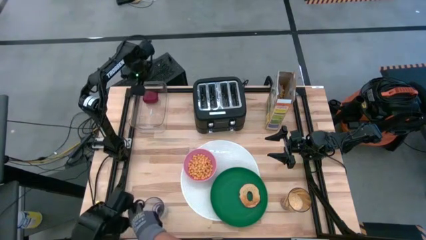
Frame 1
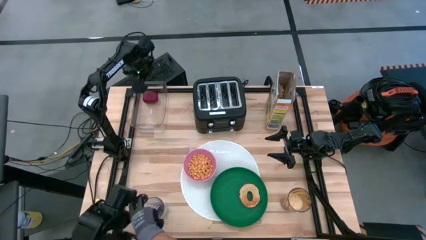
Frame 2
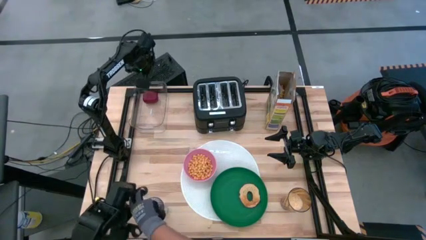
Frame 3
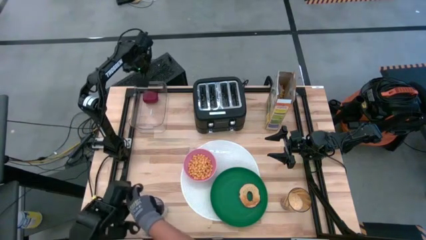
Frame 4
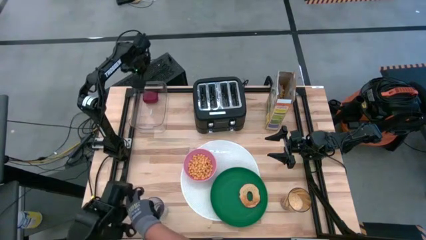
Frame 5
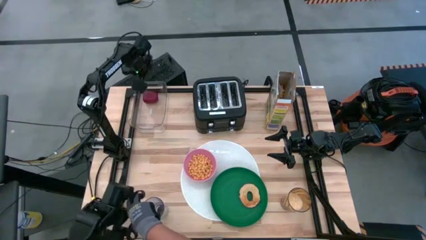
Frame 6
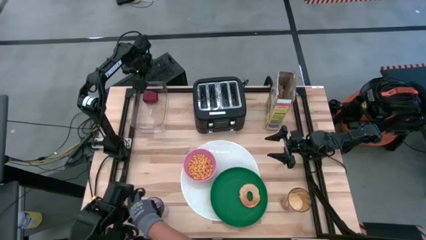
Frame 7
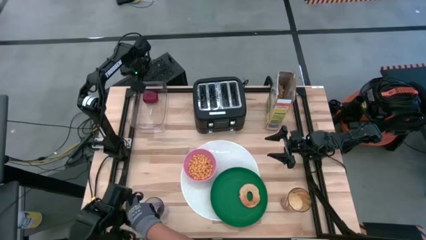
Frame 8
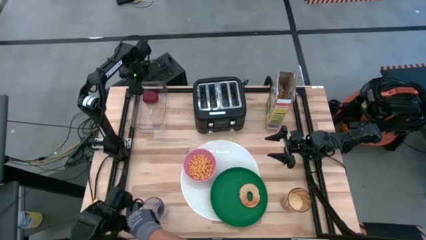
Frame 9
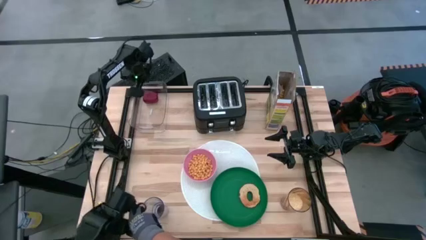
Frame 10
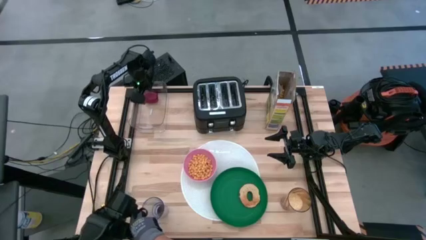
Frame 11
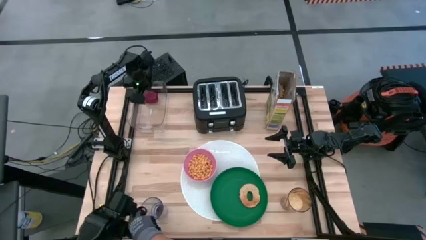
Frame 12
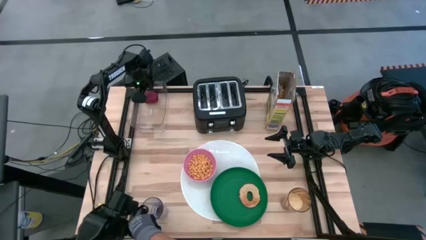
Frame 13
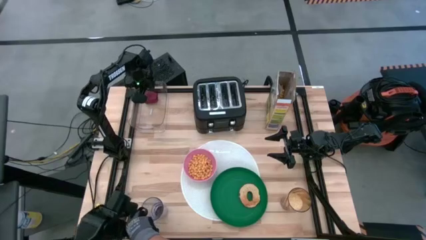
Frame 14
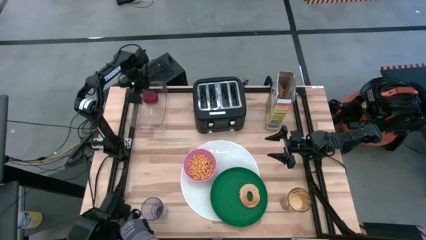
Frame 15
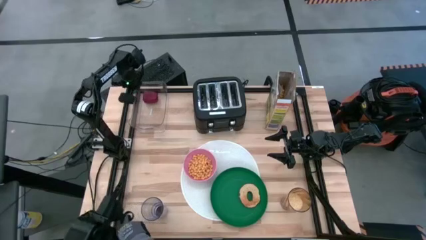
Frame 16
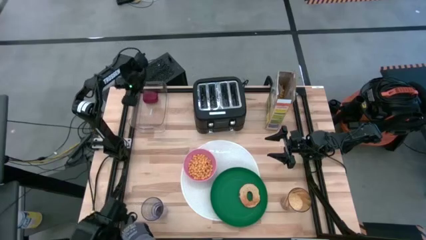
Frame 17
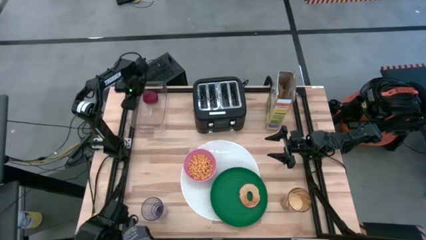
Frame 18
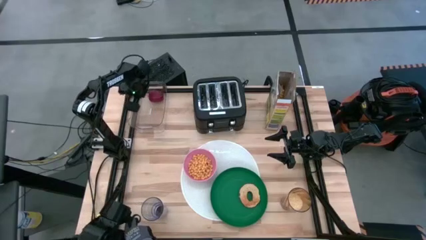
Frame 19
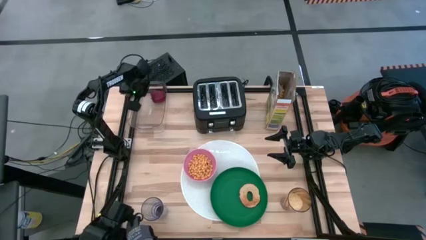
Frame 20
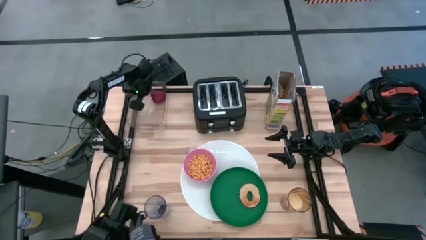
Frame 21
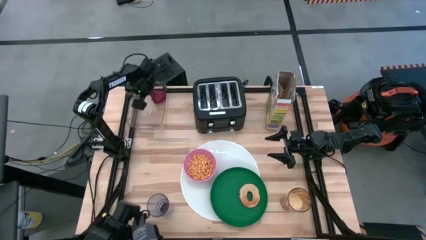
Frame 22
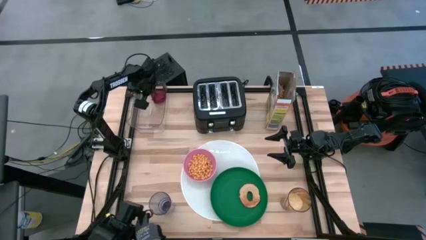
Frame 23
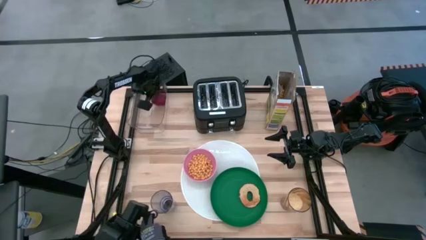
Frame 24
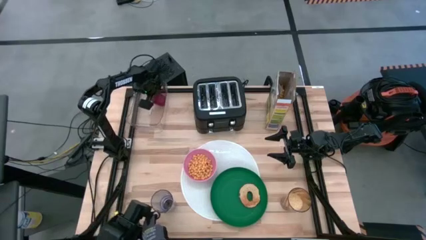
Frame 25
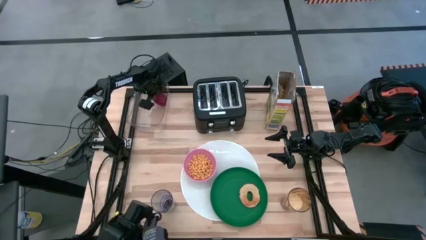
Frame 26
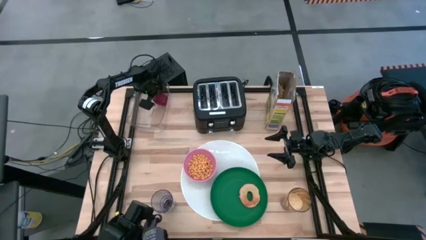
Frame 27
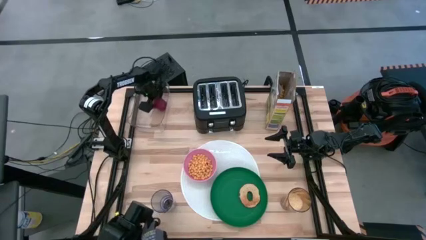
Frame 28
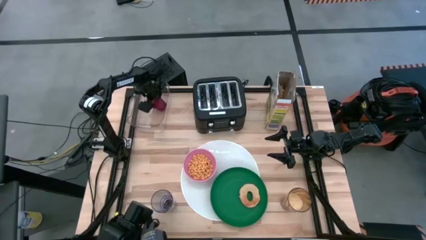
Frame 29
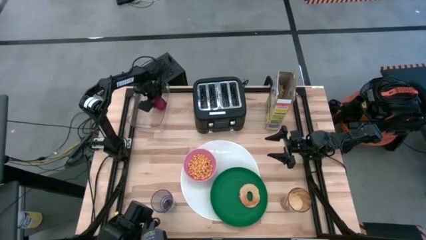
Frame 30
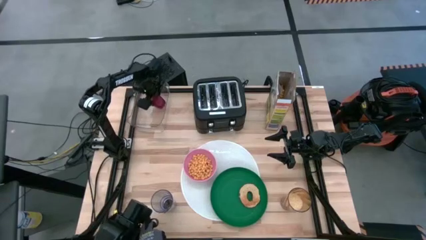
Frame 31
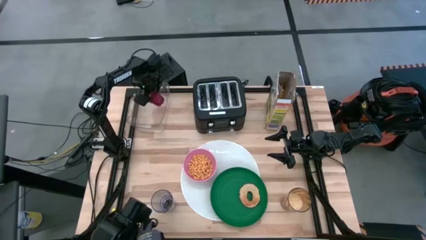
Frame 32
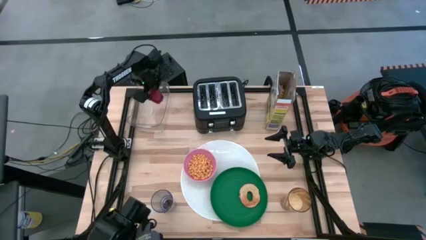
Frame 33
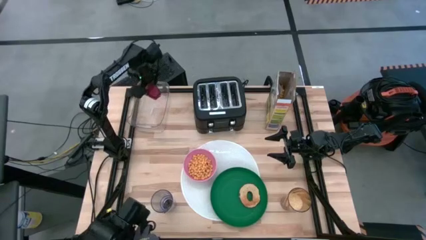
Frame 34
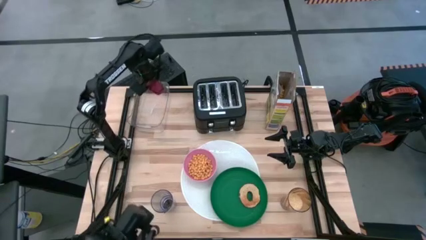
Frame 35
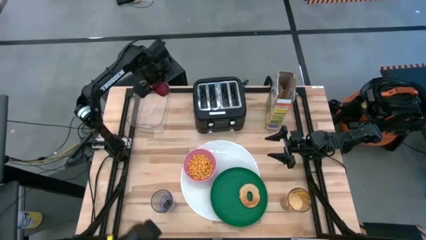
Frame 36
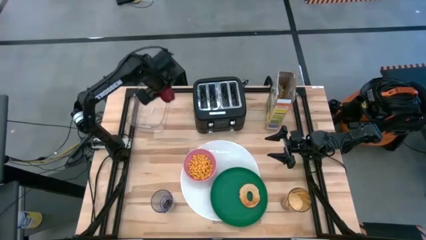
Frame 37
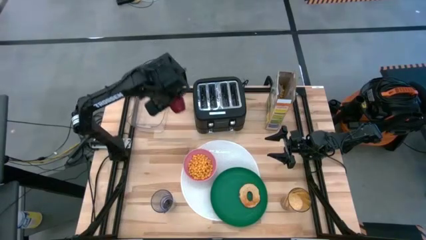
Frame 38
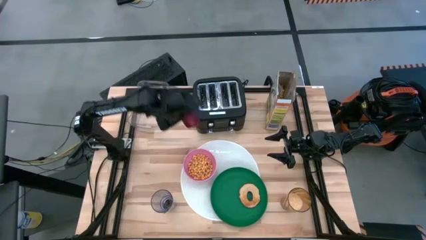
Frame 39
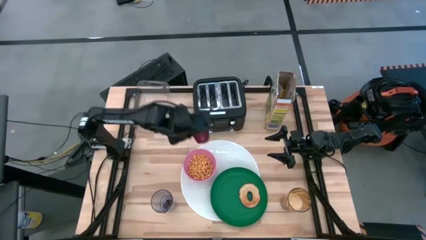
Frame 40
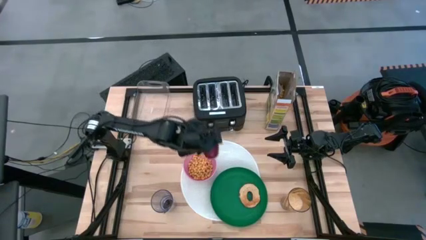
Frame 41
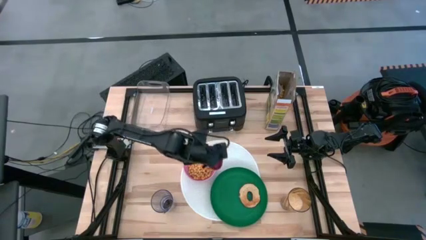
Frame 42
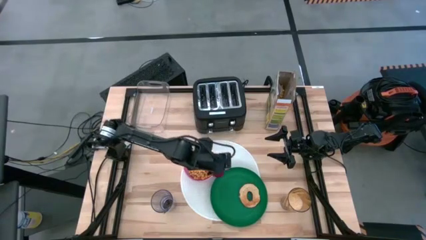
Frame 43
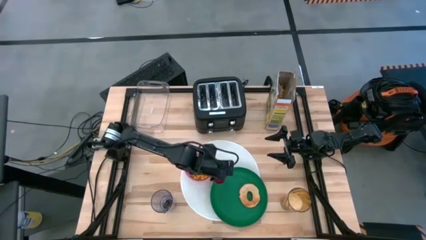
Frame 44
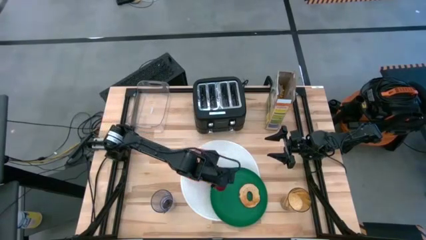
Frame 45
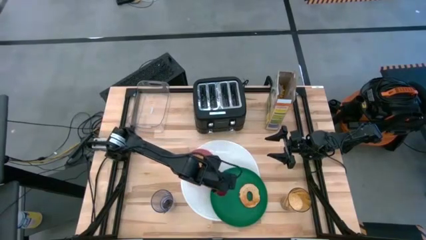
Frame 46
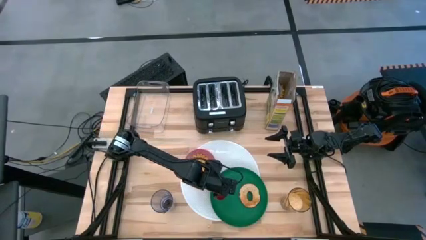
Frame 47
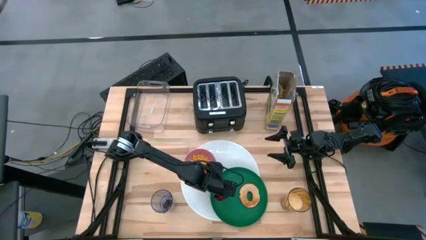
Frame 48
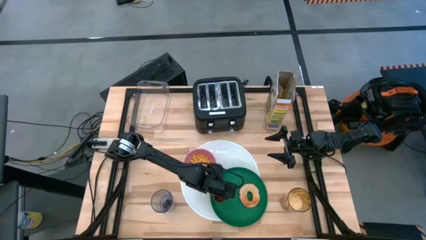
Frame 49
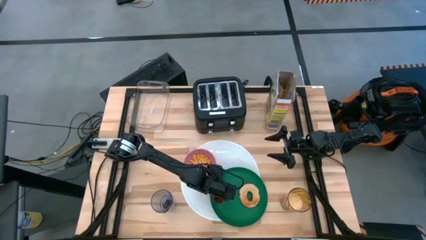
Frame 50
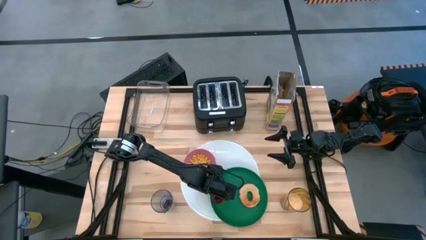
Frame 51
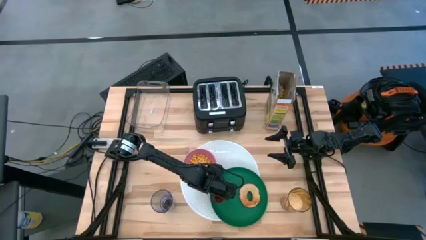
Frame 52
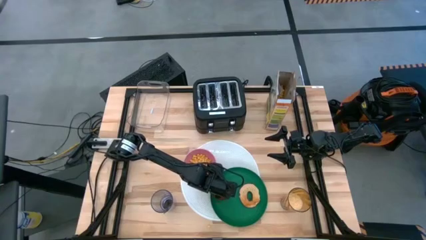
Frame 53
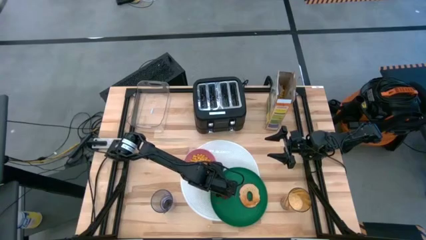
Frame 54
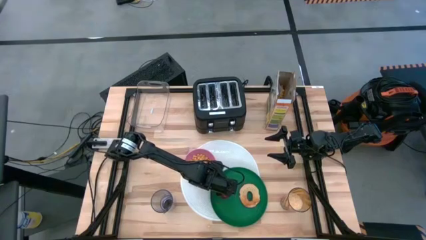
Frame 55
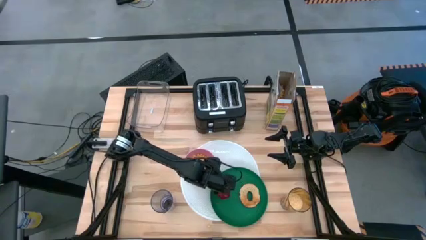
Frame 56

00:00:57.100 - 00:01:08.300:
Task: Arrange a breakfast setting
Put the red apple on the green plate

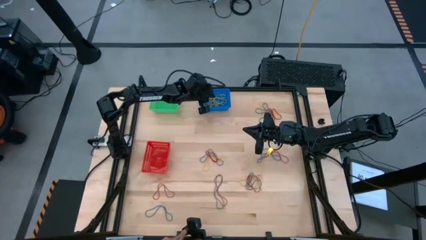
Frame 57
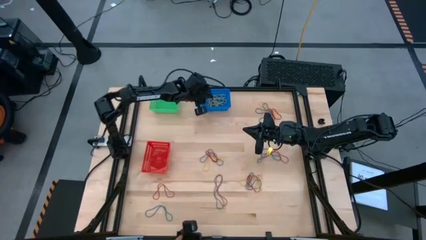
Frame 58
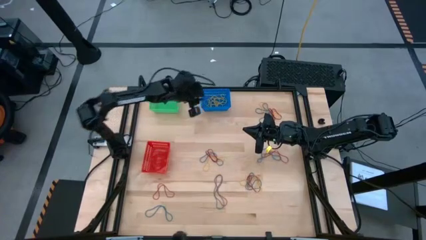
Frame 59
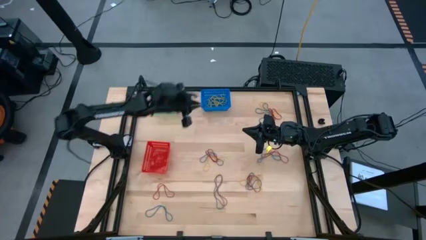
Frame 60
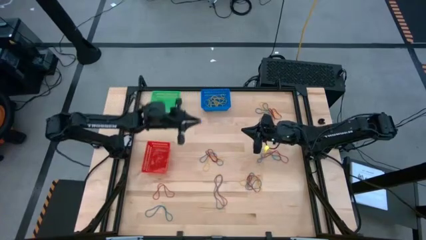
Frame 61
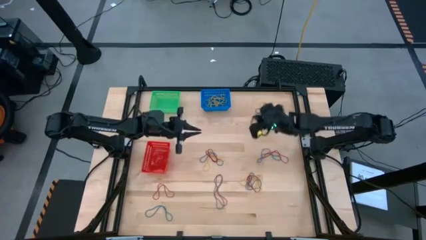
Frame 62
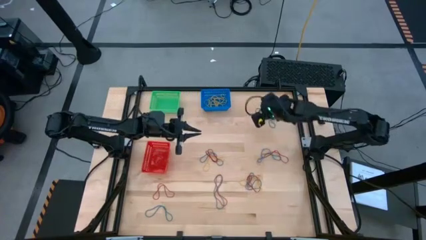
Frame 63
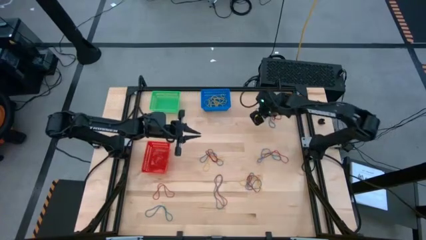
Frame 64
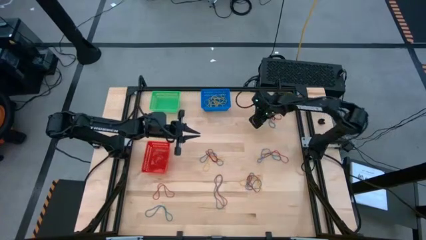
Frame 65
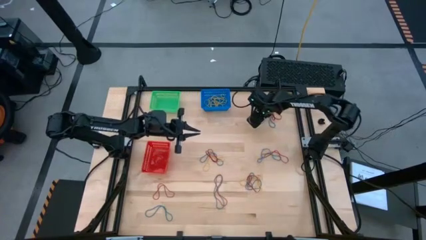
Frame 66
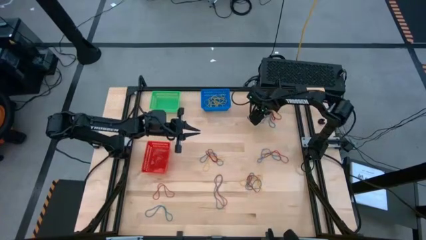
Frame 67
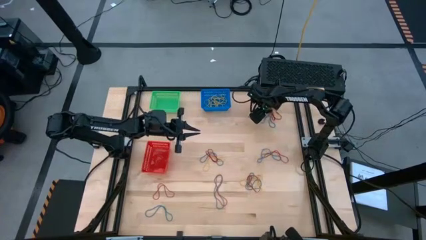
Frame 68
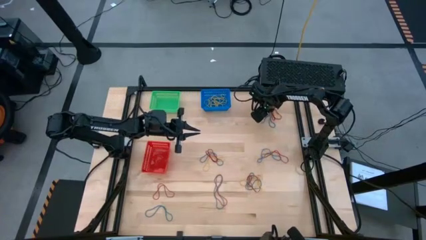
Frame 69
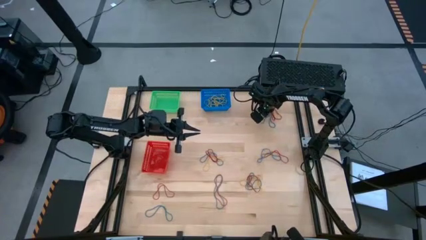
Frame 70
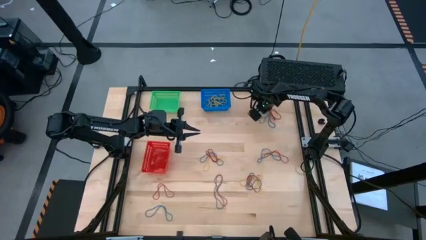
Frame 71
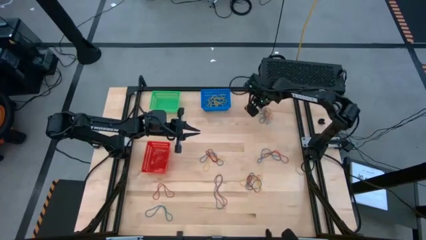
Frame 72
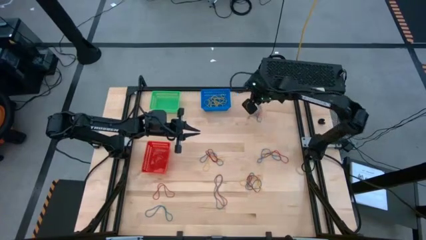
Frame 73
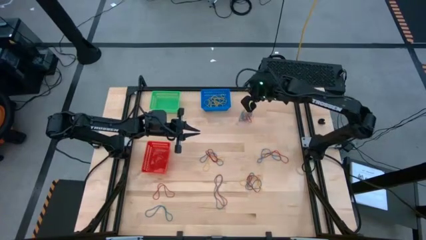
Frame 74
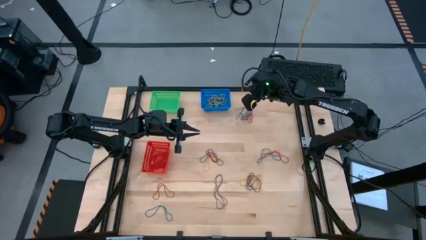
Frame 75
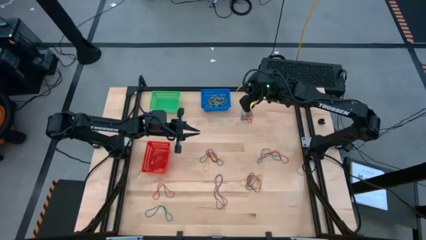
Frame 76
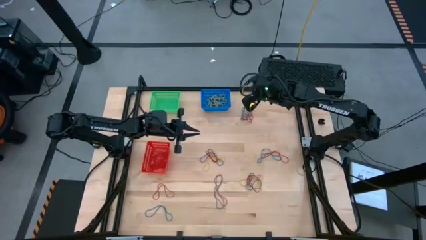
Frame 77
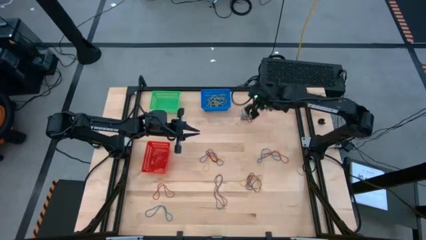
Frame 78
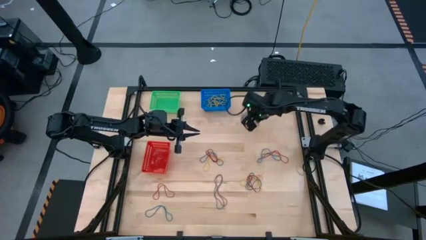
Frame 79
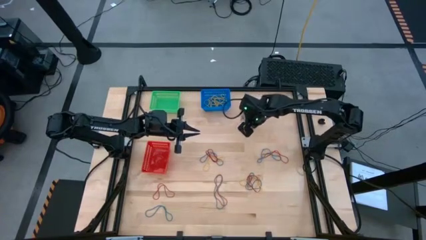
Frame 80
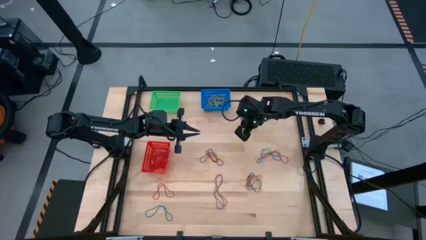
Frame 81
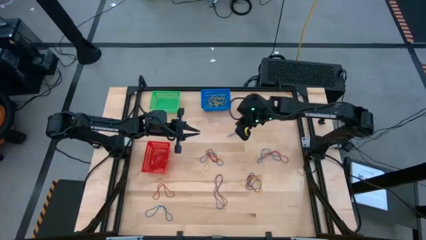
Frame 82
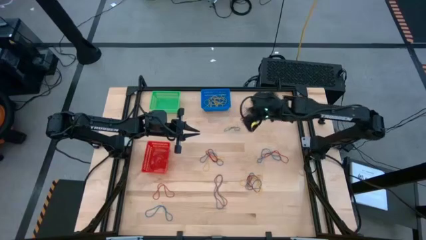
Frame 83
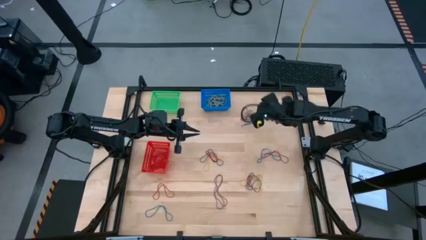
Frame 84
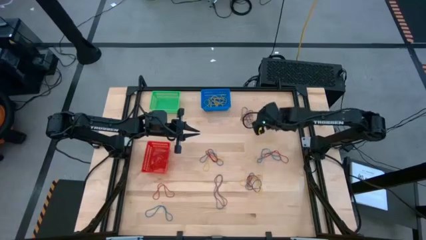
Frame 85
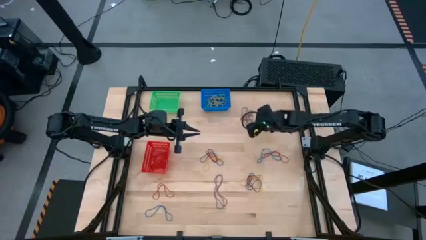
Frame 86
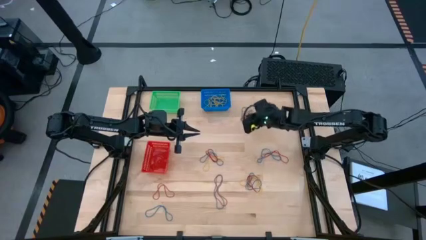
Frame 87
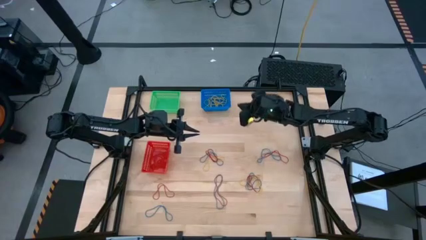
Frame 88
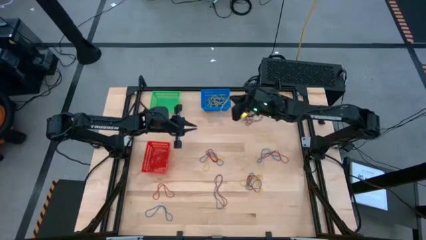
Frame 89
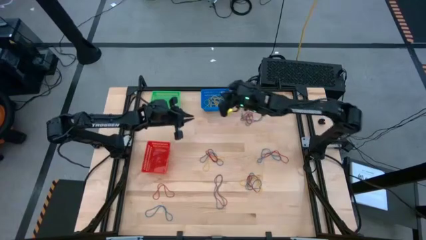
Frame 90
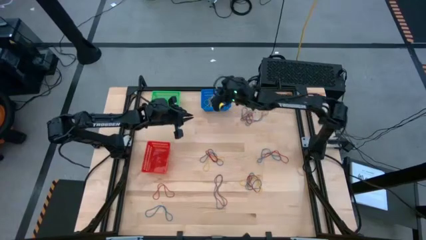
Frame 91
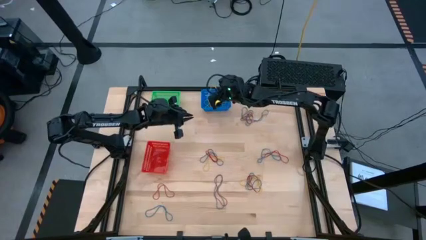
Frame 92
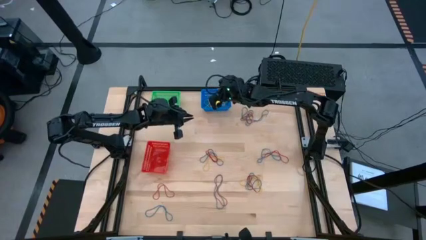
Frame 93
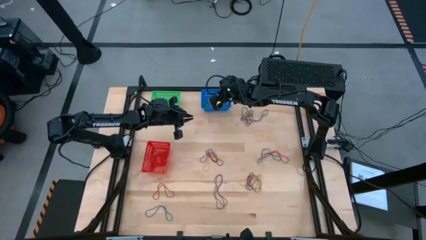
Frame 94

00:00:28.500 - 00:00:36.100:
Task: Sort rubber bands into baskets
Put the yellow rubber band into the blue bin
